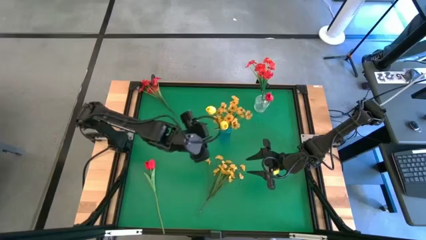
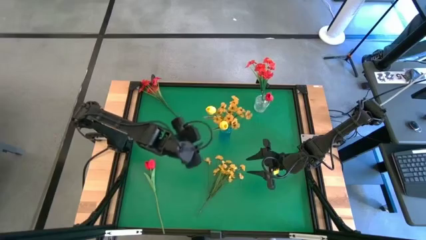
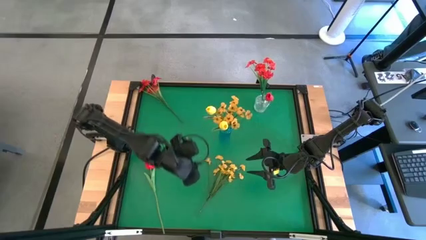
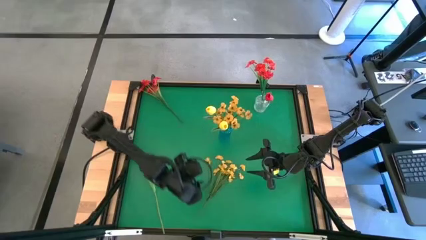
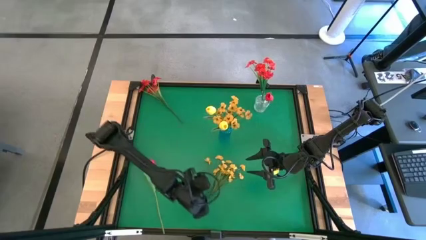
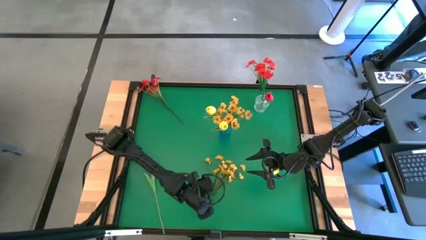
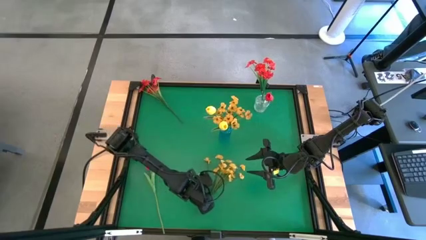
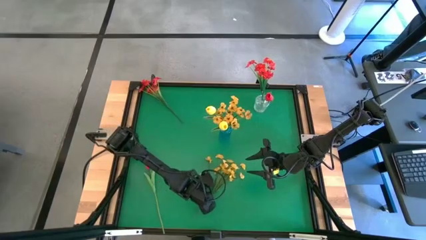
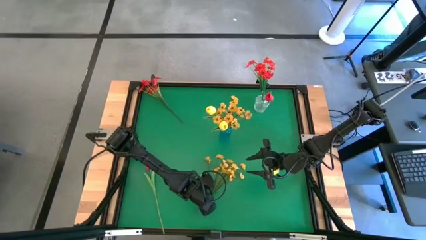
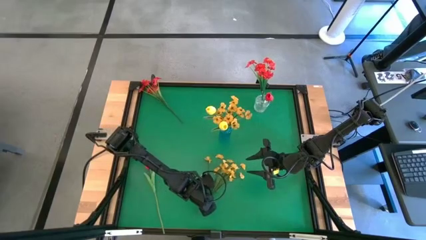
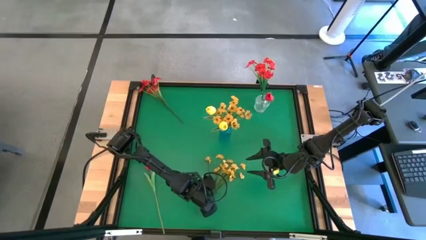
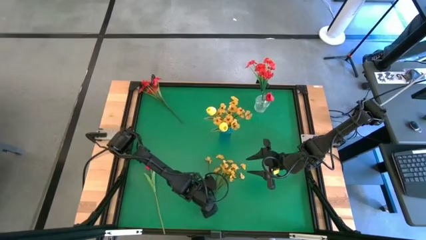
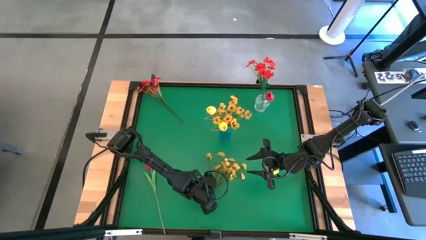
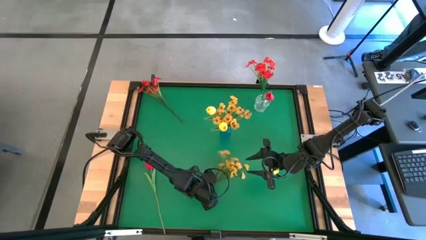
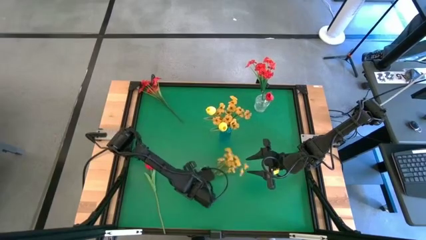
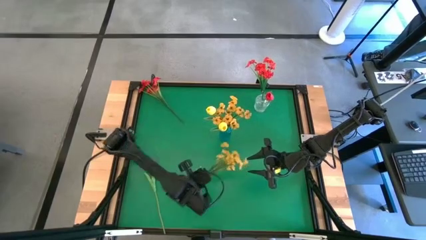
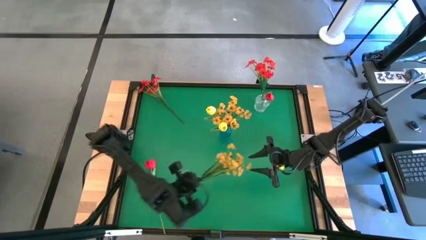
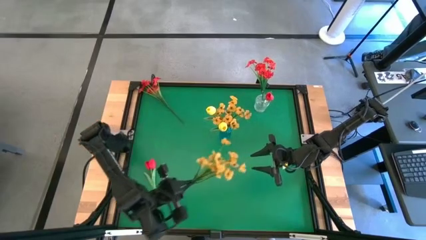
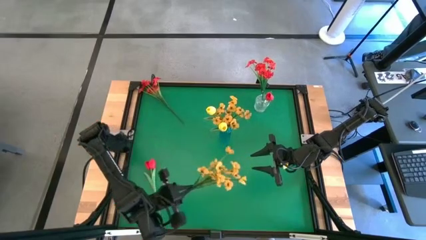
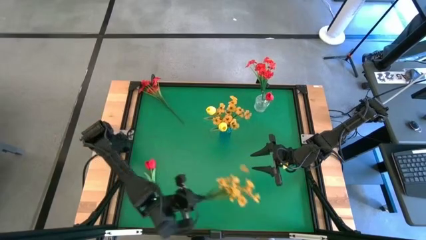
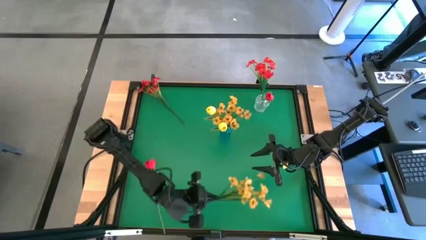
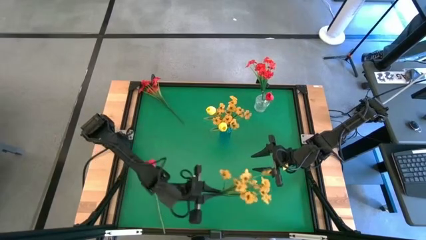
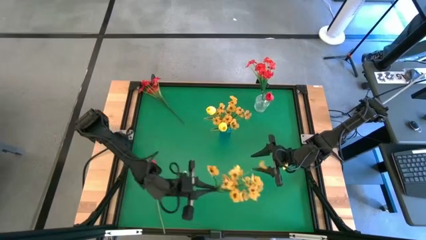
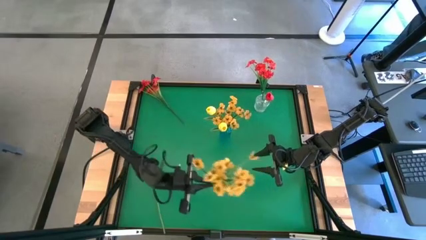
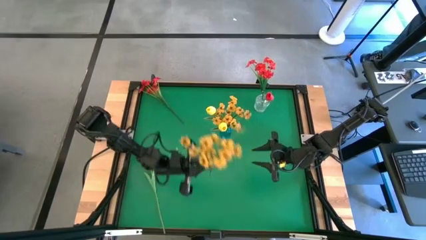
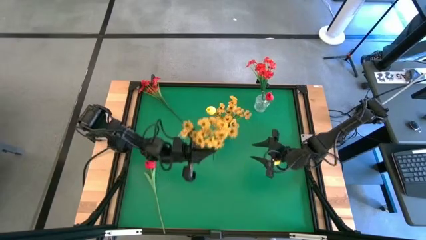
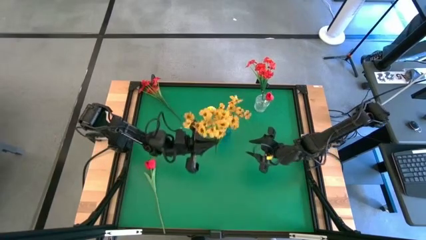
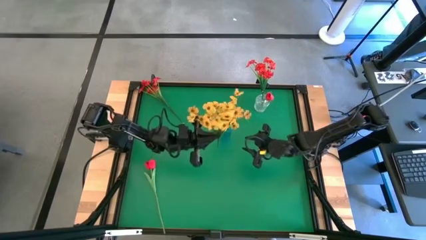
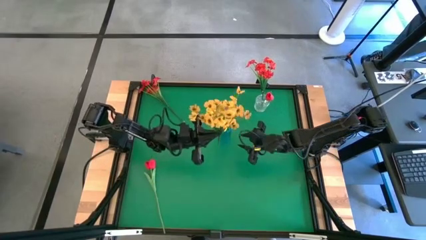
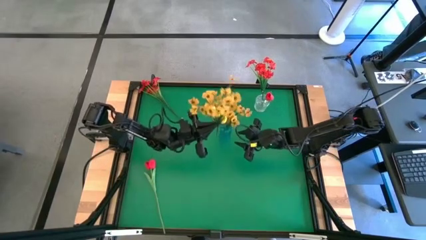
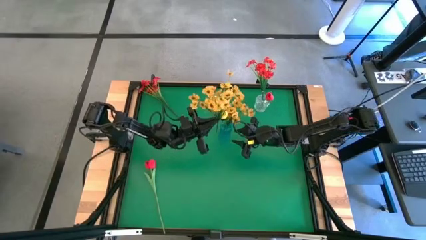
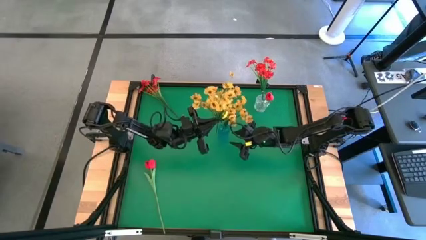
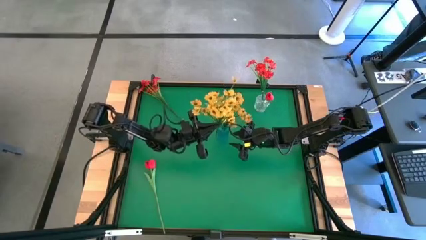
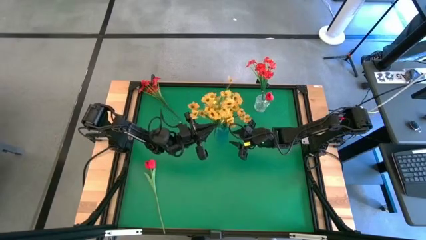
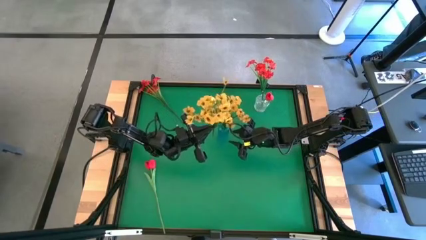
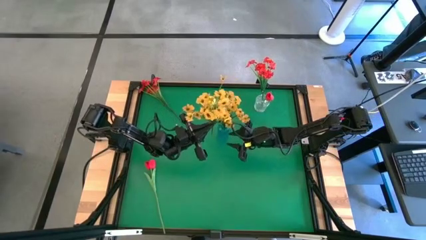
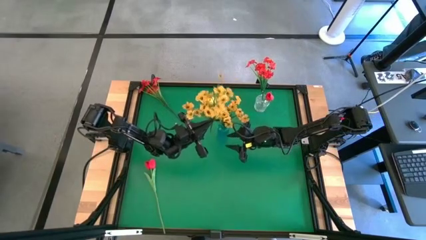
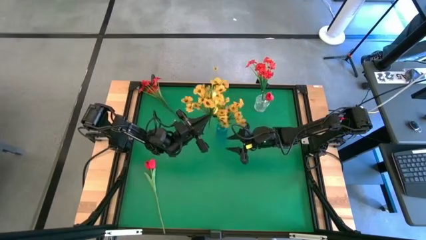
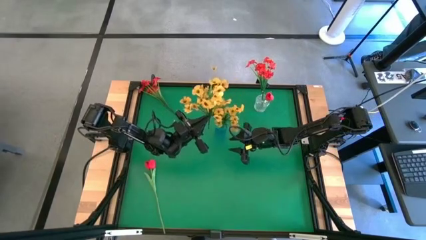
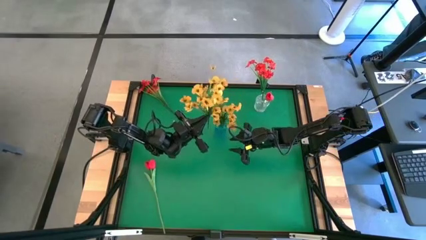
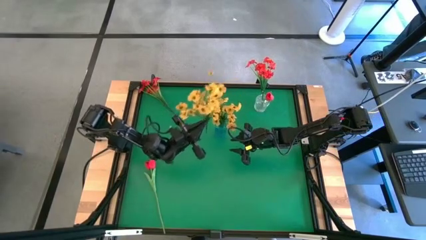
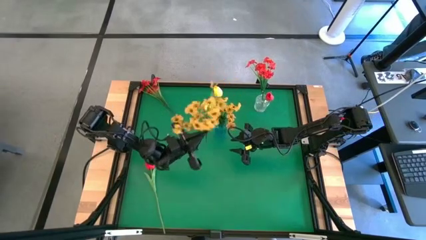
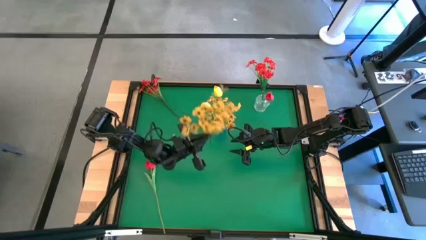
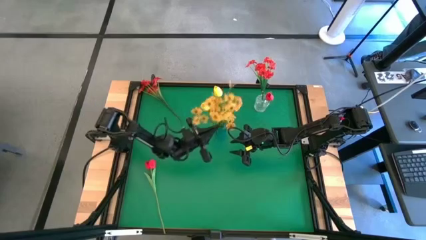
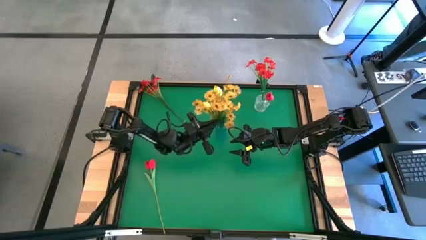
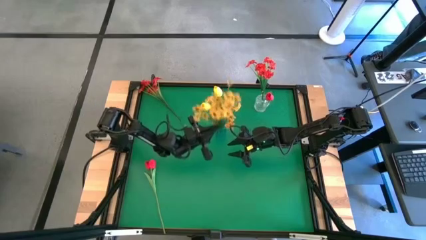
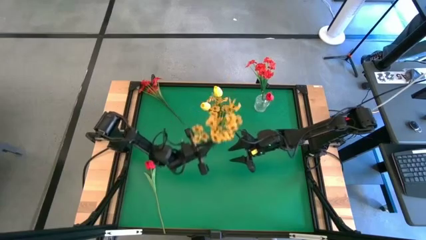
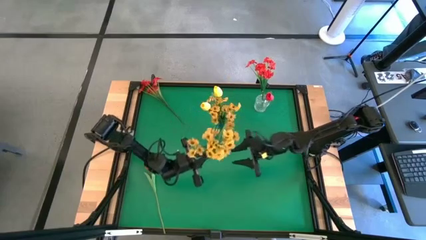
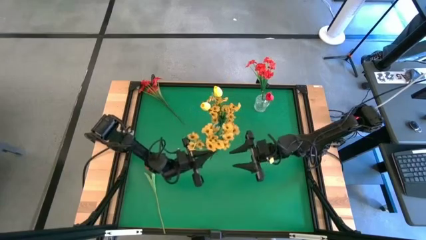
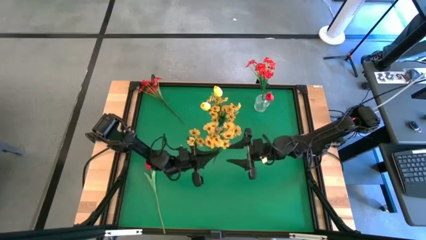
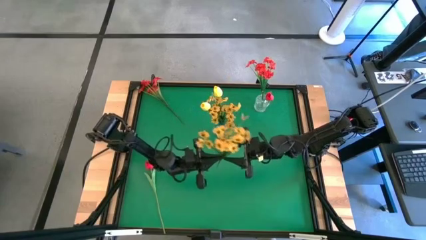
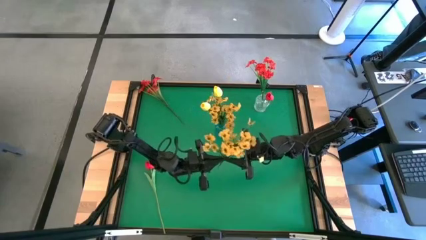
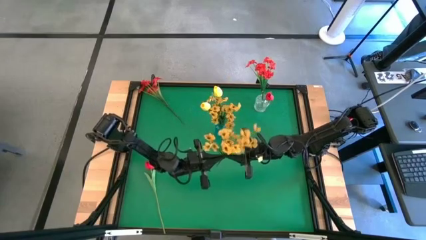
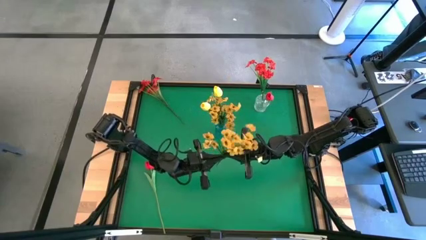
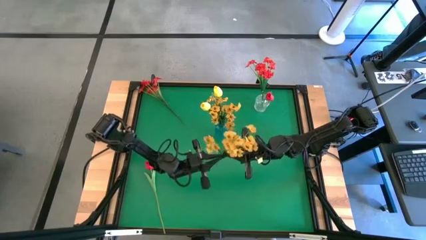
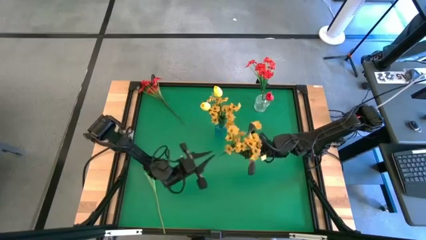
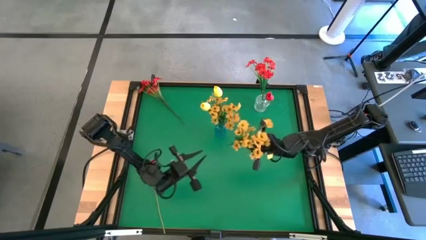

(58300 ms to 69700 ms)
Task: Sort flowers into vase by color
Put the yellow flowers into the blue crystal vase

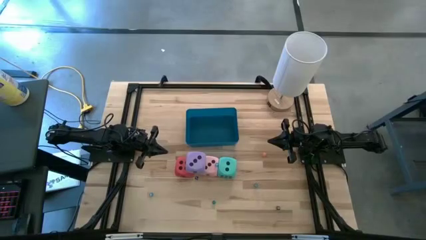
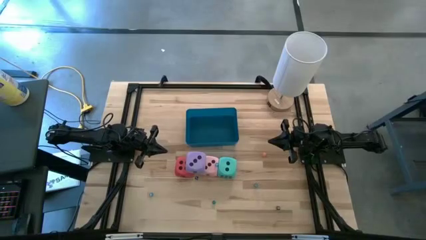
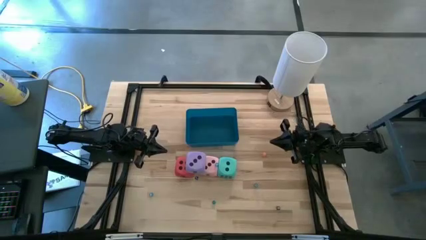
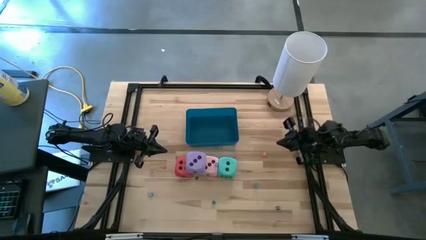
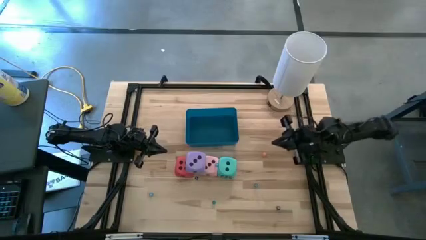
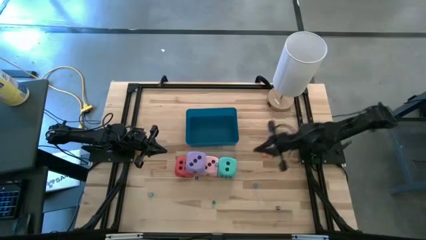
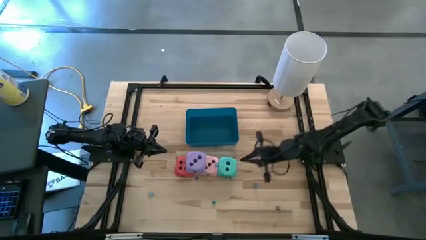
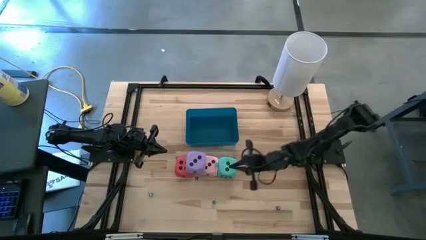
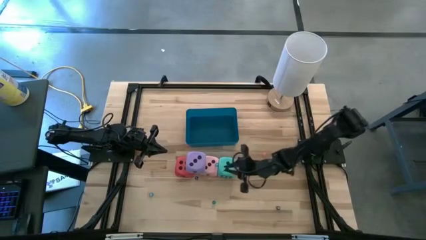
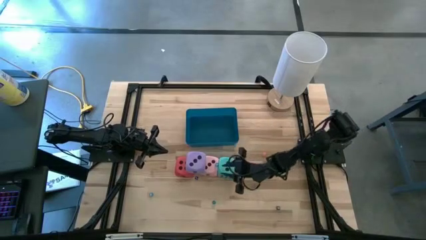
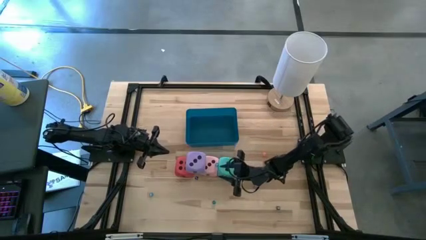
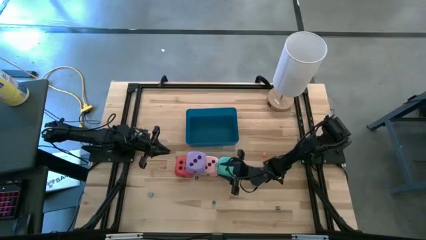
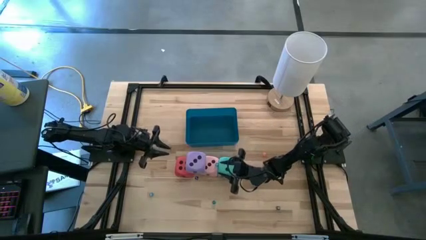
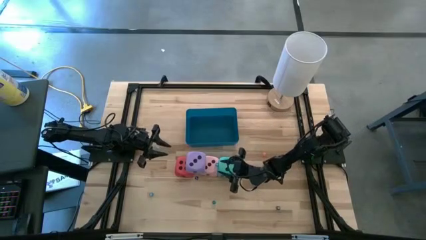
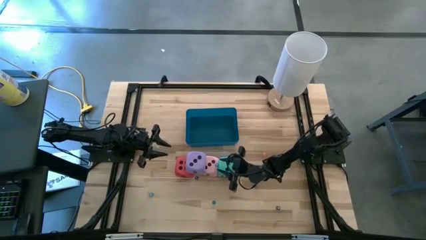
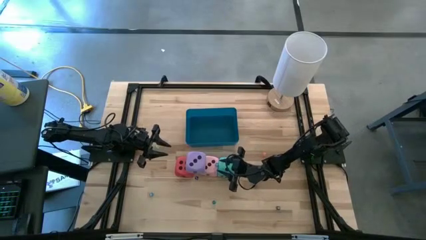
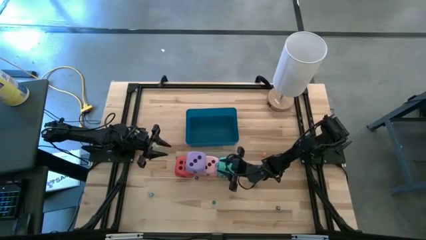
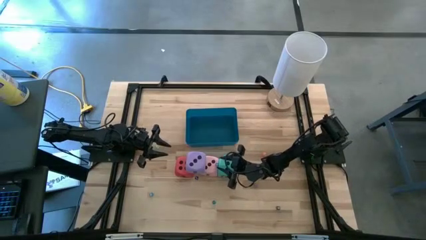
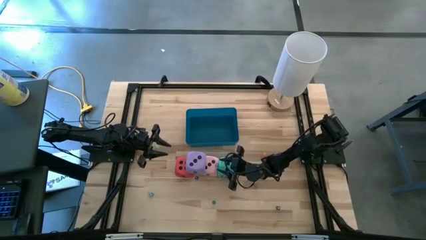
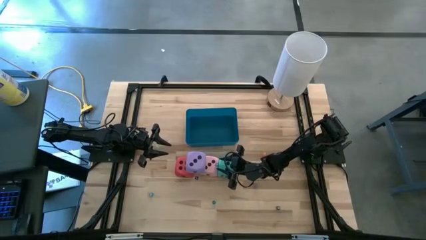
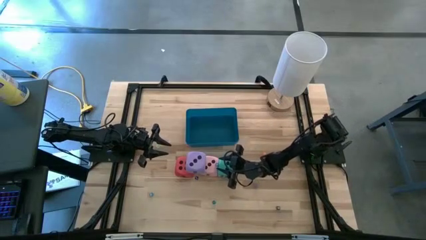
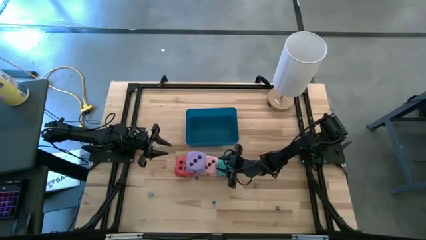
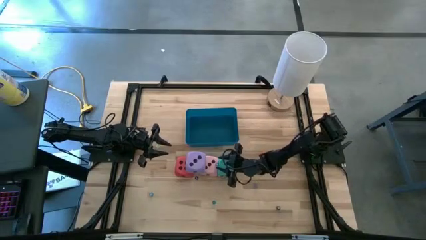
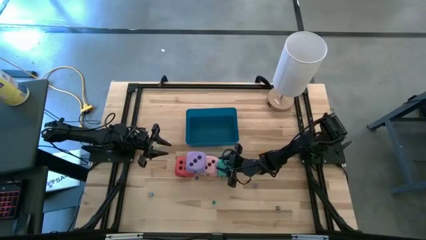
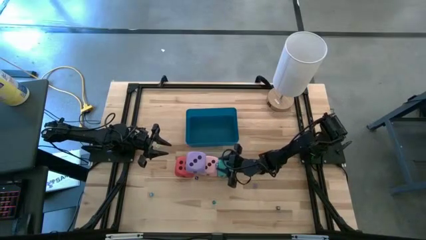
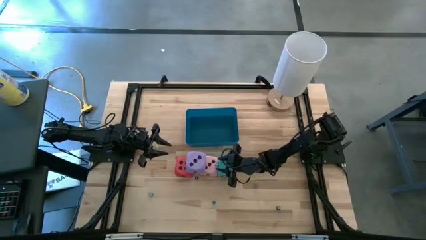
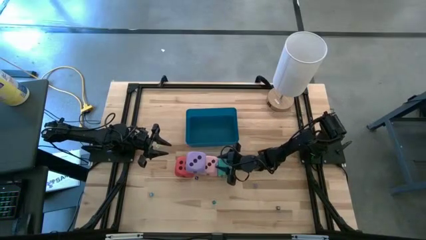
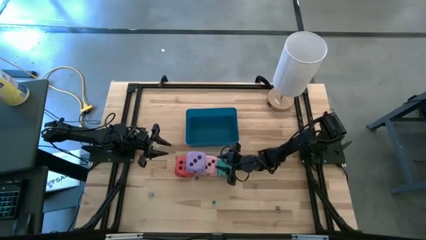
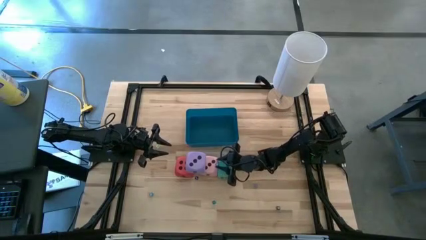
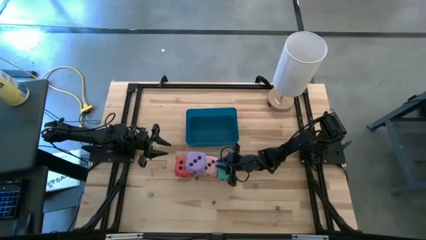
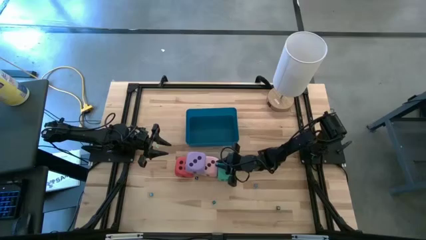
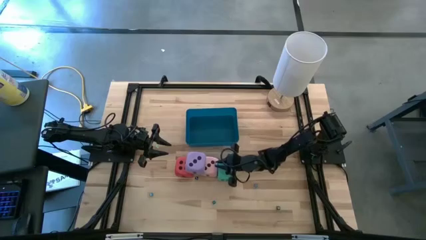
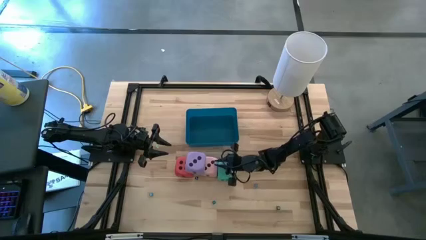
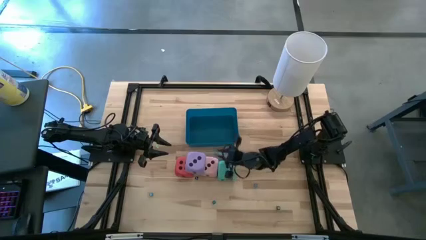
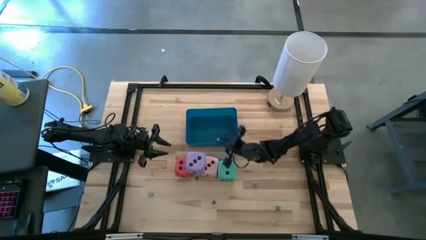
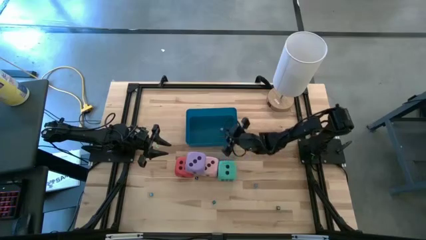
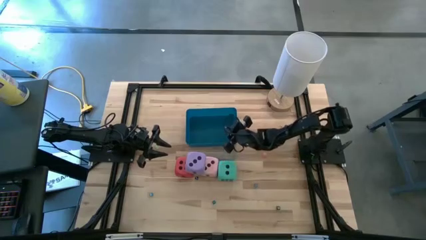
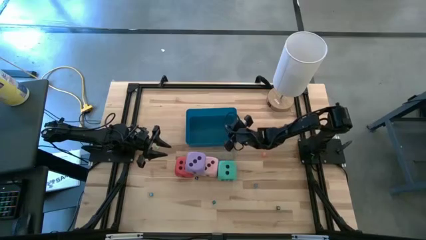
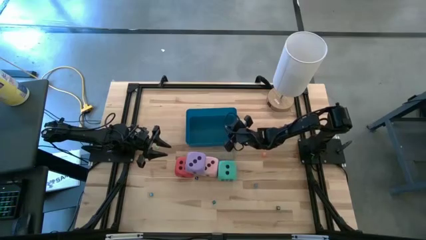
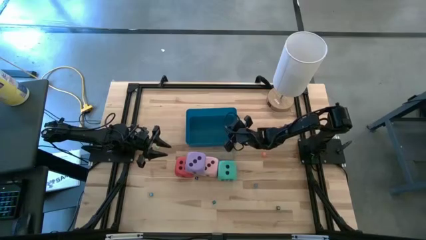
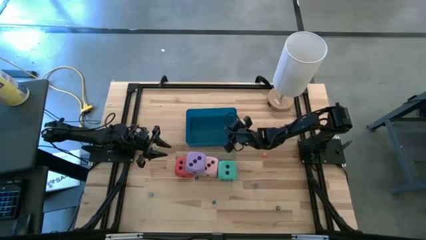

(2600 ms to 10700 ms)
Task: Pick & Place Dice
Put the blue die into the blue bin
